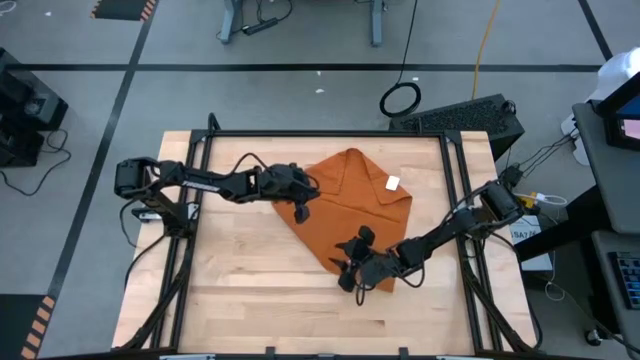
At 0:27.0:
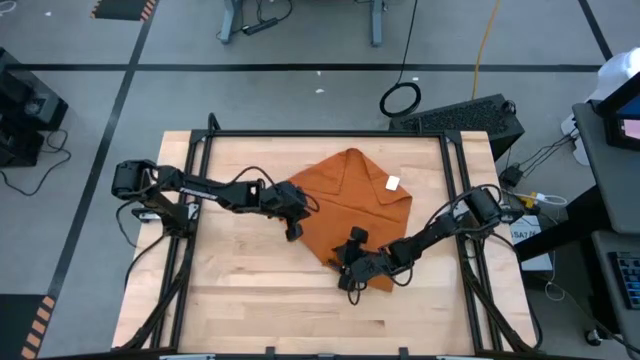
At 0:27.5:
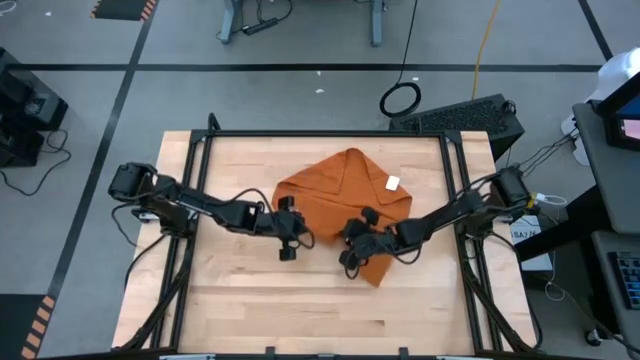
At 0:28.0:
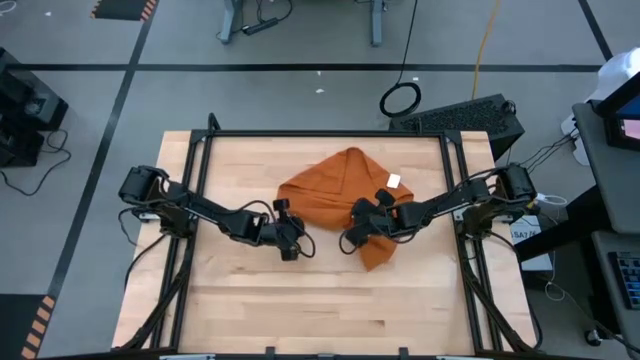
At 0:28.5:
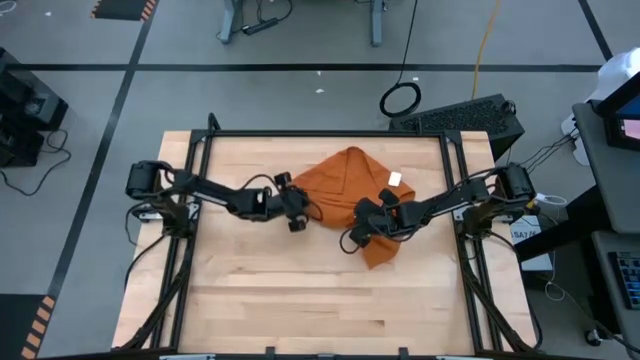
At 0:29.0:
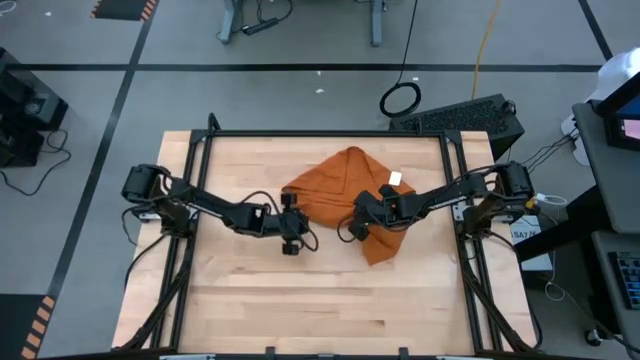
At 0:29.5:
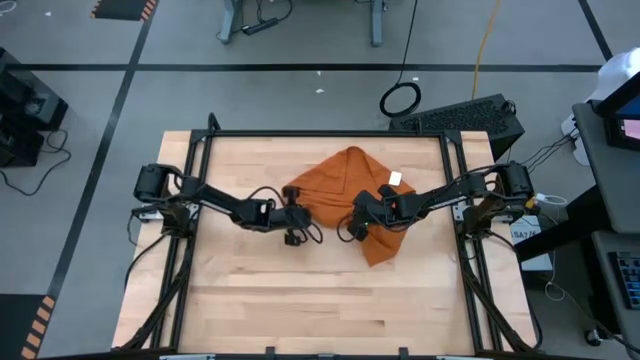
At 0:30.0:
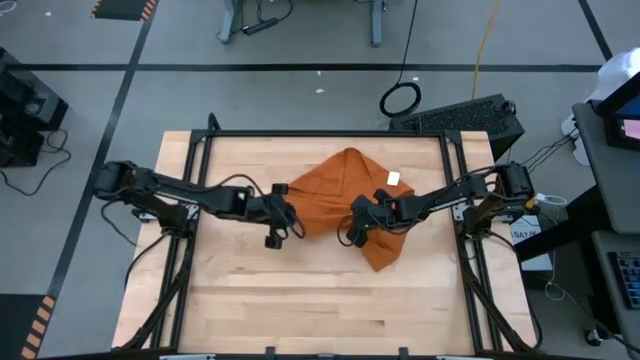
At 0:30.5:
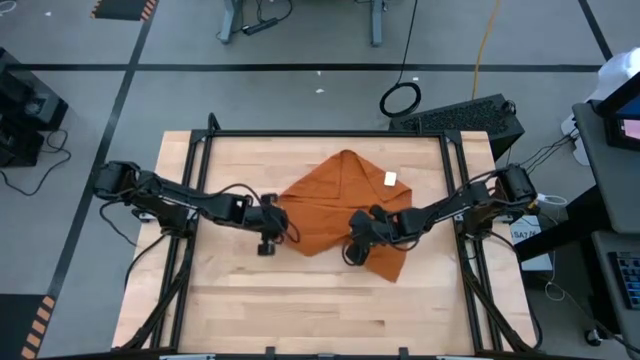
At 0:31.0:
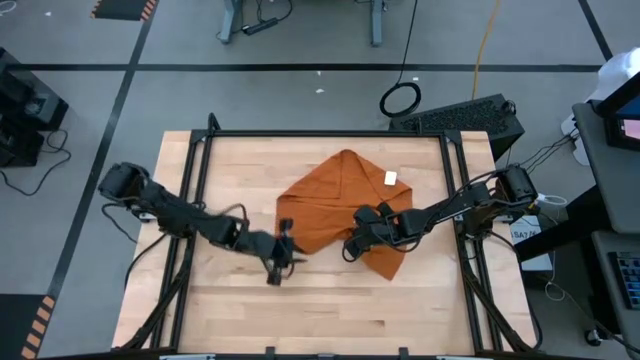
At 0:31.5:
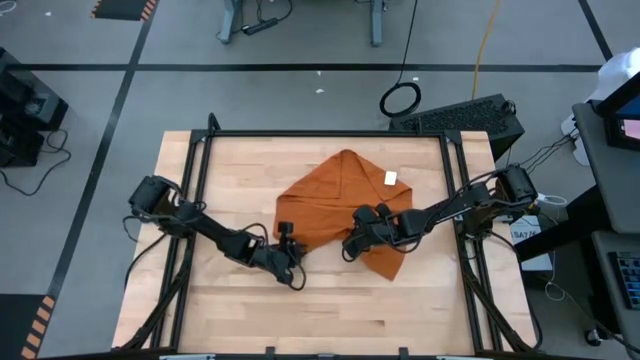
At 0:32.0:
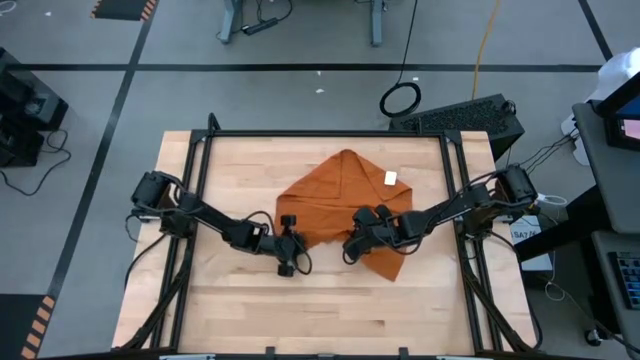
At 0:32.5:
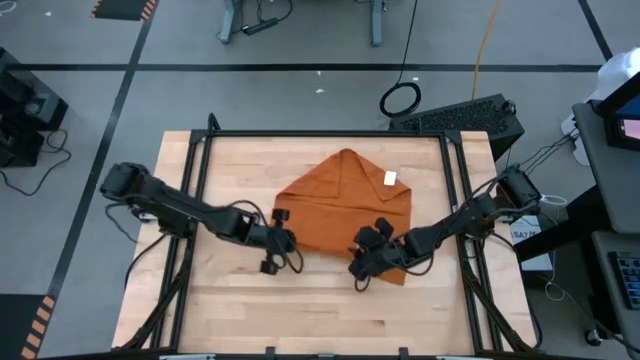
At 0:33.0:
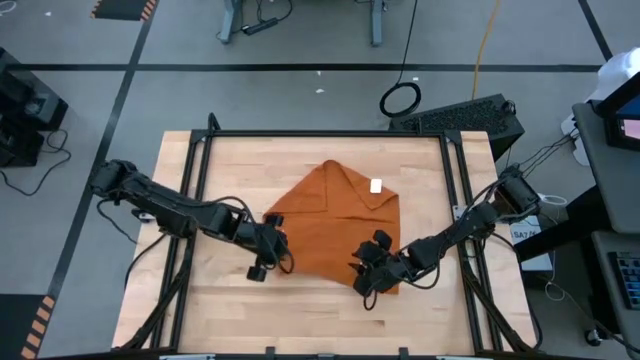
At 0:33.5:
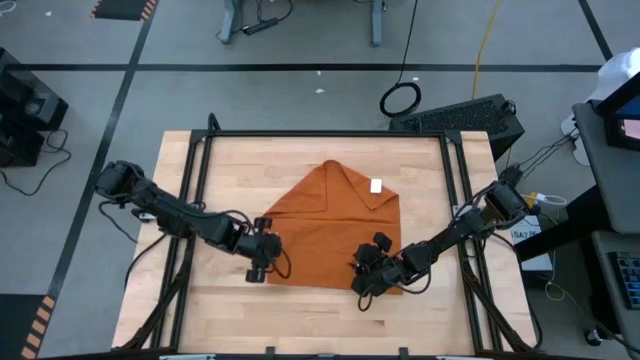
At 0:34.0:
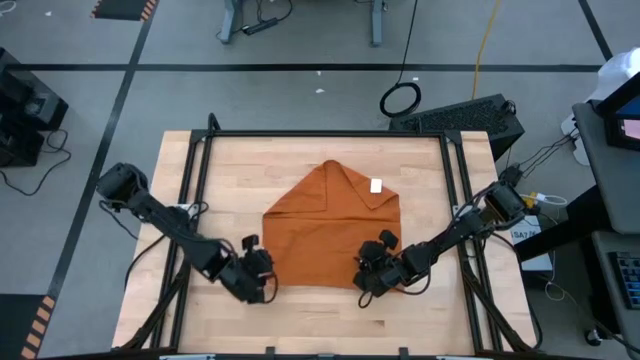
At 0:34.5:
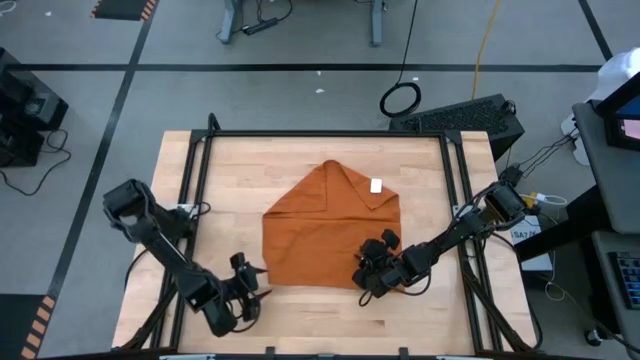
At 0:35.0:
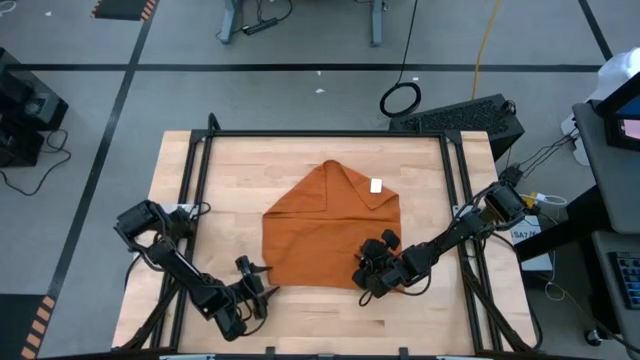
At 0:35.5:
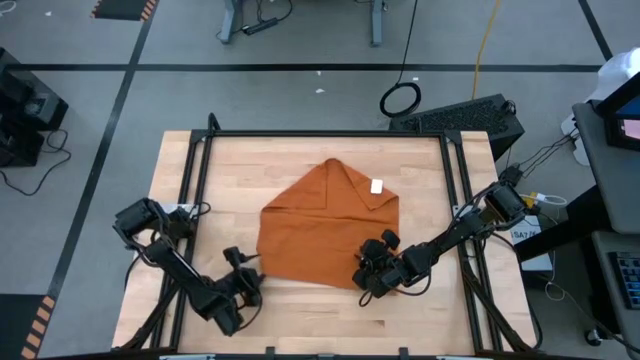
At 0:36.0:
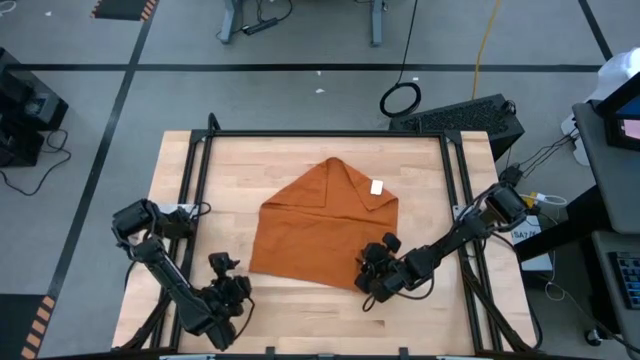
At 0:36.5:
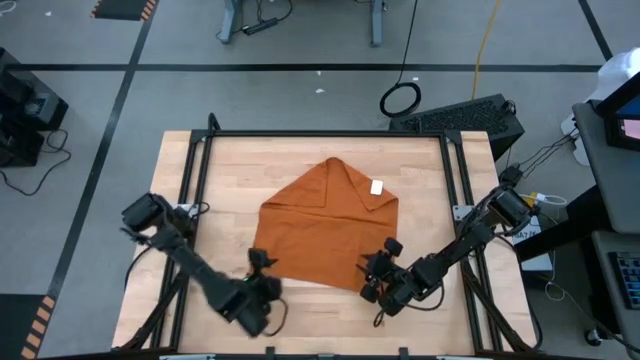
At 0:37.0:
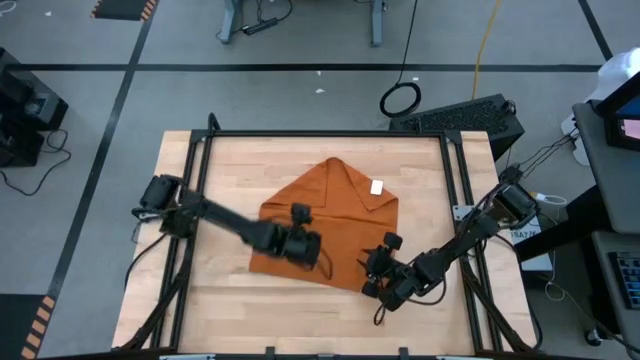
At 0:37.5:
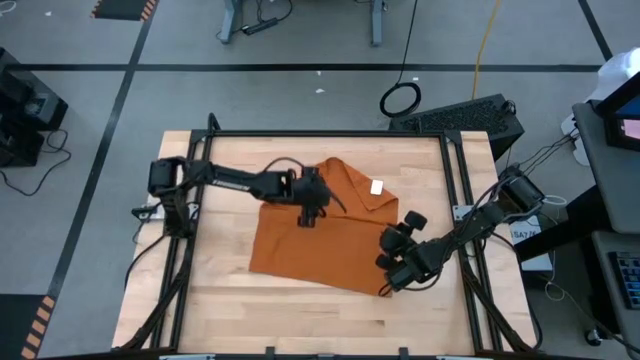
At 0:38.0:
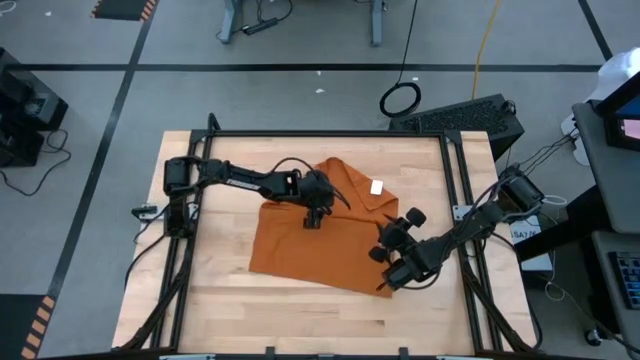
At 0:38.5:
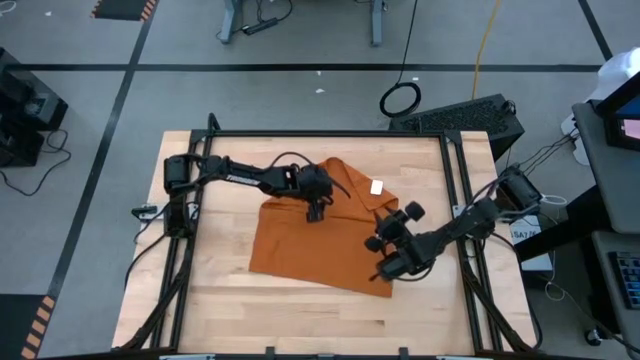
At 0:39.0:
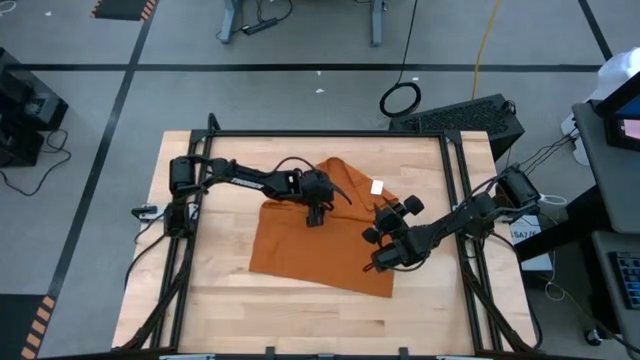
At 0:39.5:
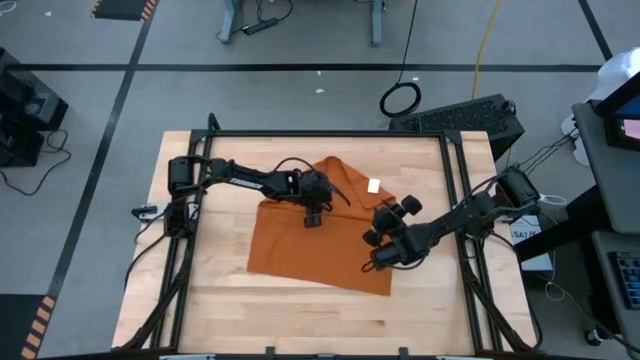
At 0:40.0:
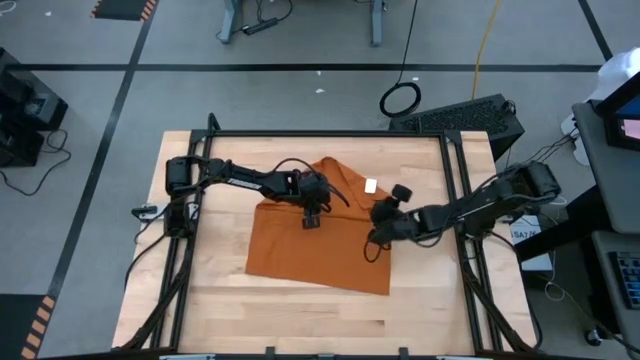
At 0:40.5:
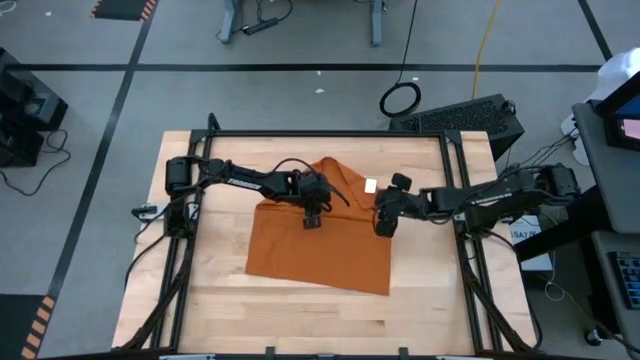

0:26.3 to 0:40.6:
Task: Roll towel into tight, uniform cylinder
Fold the brown towel

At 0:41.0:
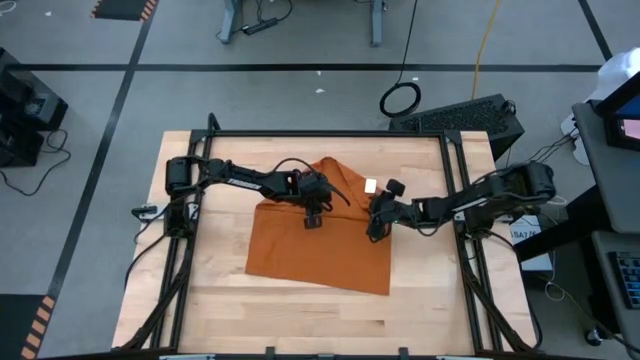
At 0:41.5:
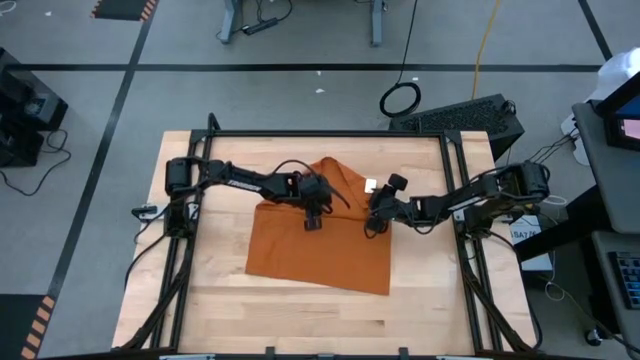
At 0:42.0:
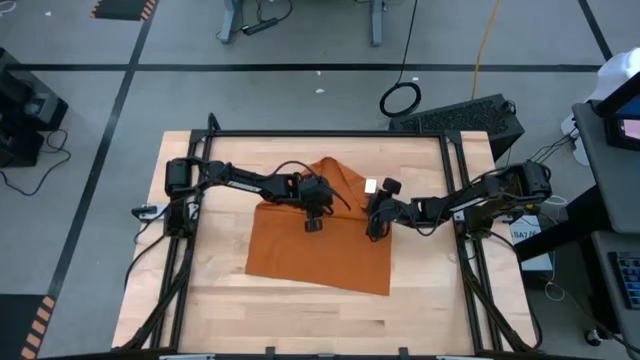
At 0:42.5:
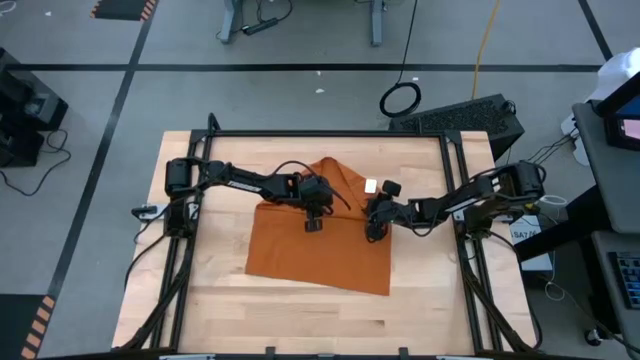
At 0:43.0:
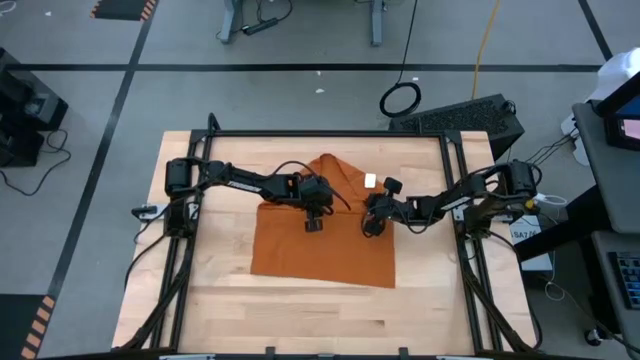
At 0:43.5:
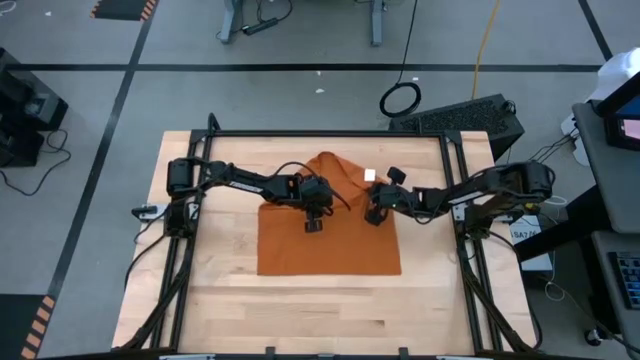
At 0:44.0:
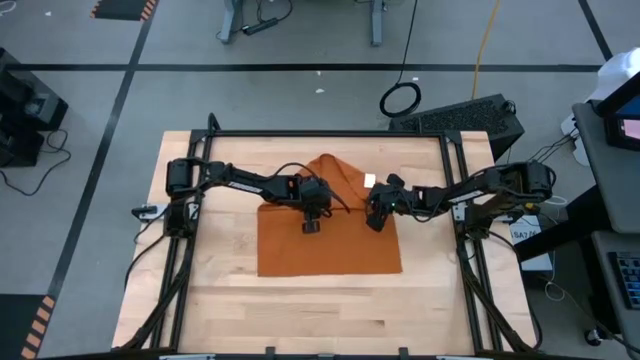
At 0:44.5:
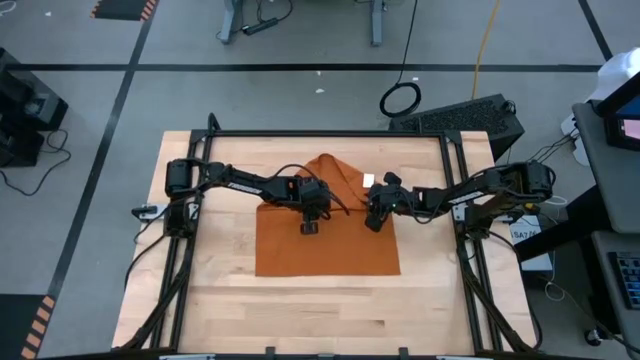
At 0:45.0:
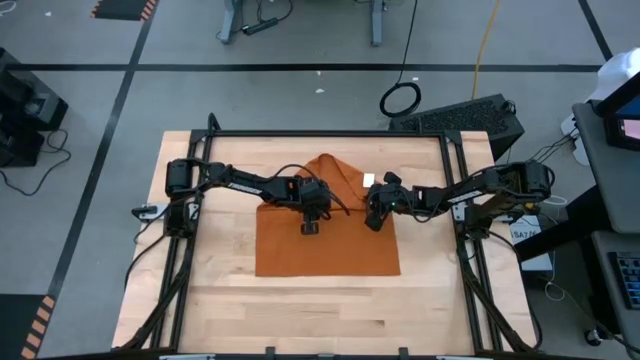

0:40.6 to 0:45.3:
Fold the brown towel

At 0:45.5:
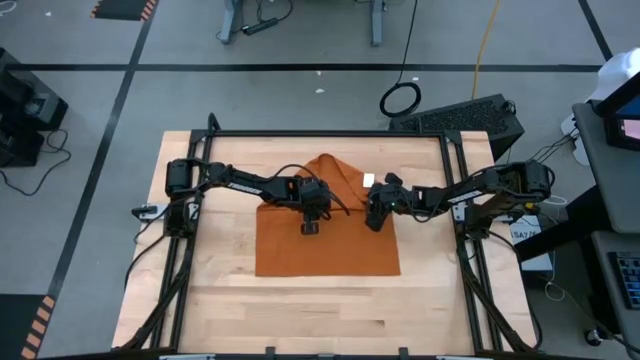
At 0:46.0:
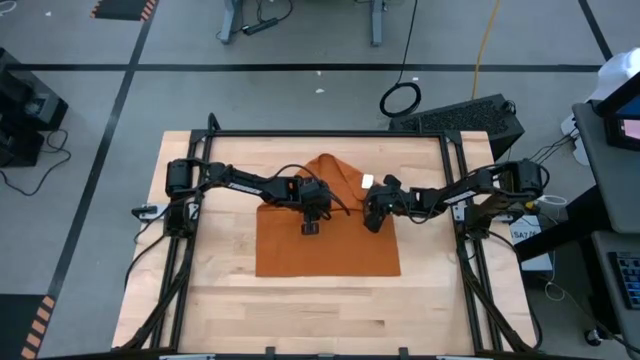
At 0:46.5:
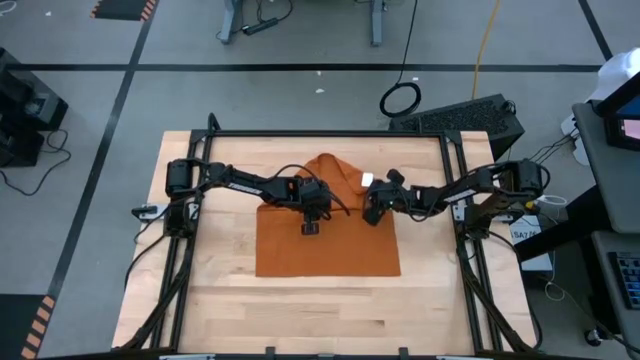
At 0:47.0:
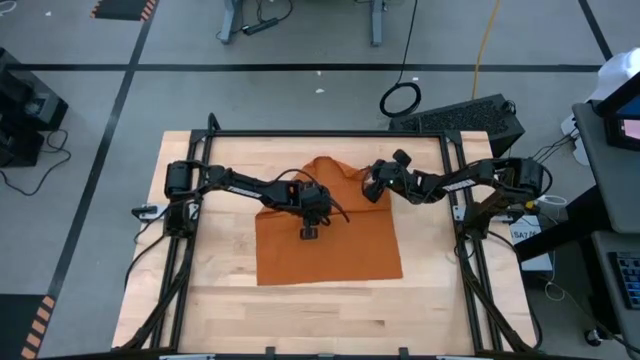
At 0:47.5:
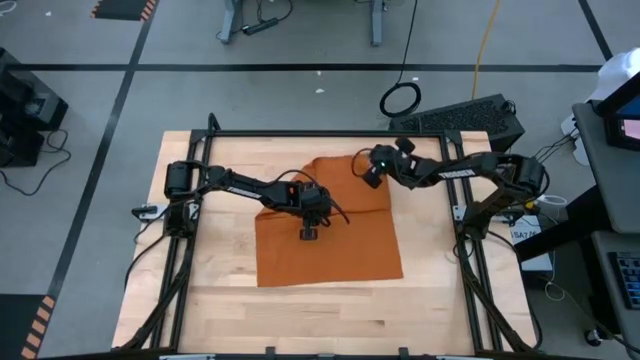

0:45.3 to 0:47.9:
Fold the brown towel
